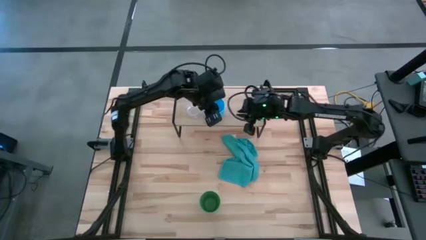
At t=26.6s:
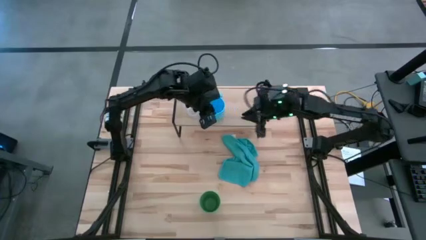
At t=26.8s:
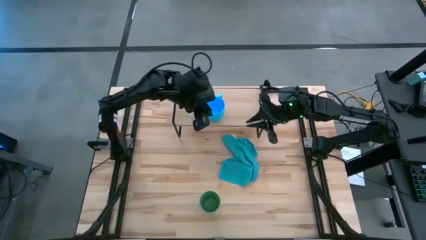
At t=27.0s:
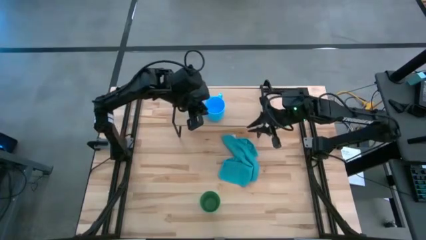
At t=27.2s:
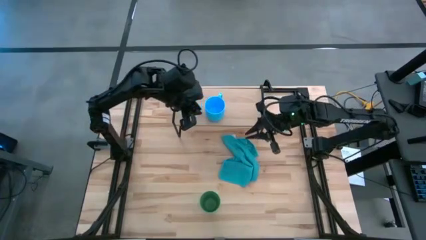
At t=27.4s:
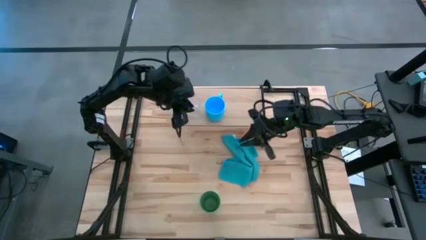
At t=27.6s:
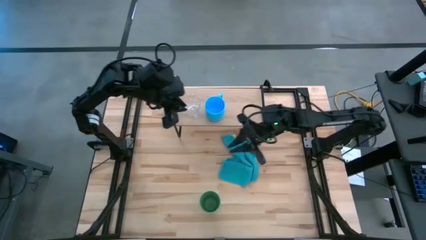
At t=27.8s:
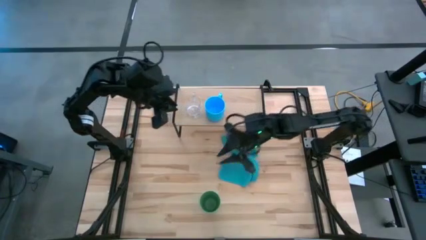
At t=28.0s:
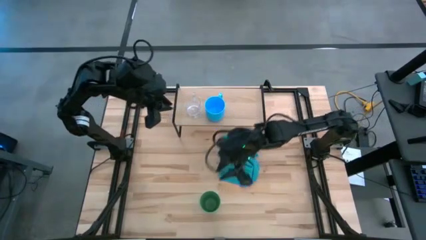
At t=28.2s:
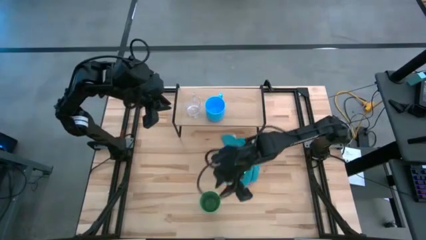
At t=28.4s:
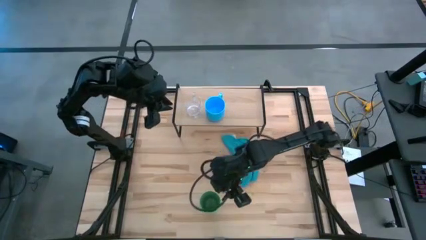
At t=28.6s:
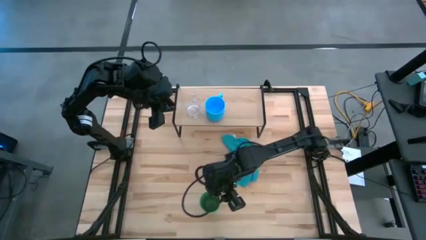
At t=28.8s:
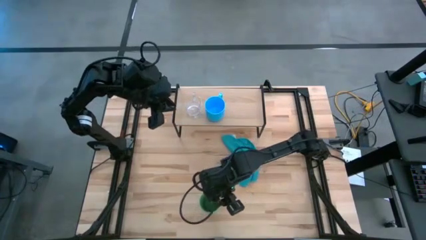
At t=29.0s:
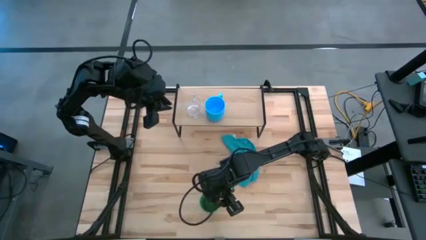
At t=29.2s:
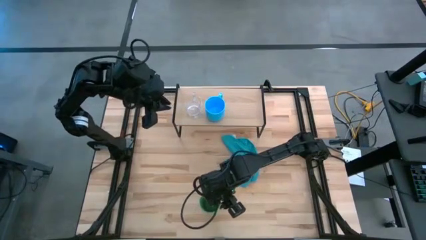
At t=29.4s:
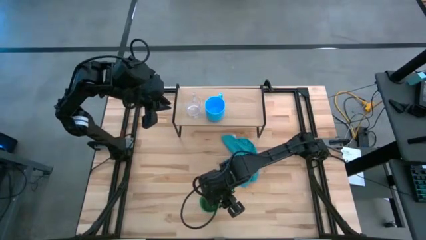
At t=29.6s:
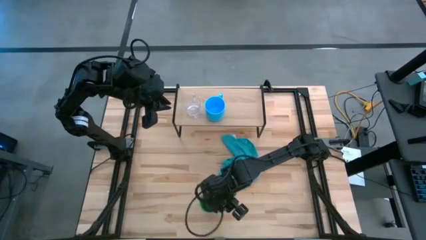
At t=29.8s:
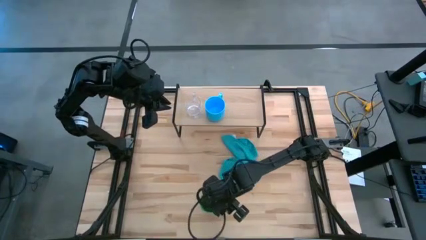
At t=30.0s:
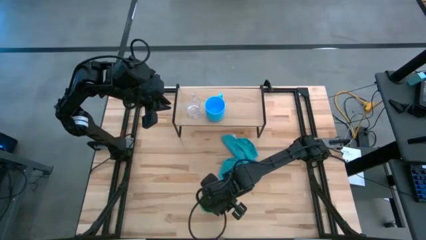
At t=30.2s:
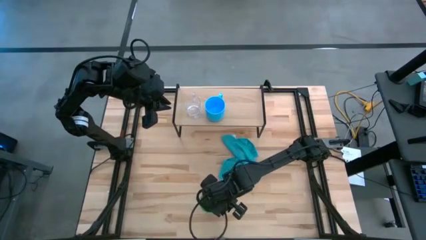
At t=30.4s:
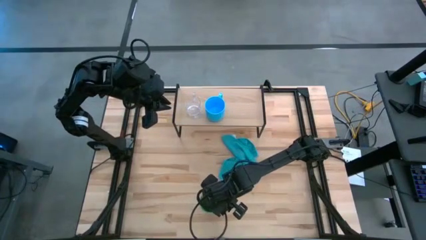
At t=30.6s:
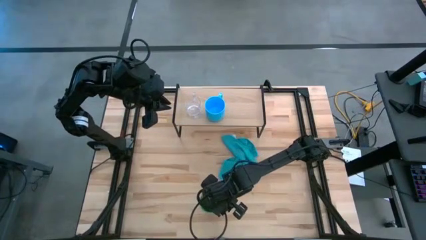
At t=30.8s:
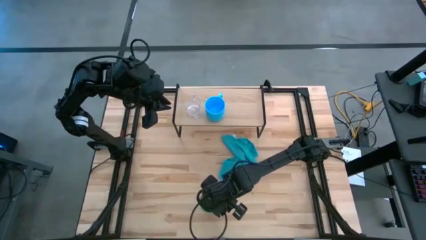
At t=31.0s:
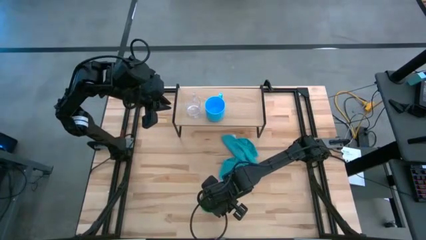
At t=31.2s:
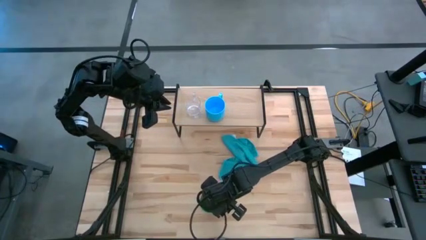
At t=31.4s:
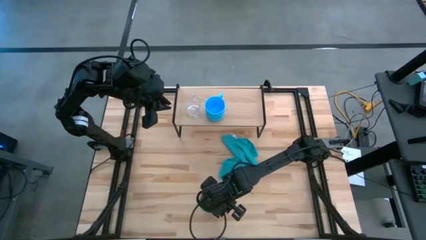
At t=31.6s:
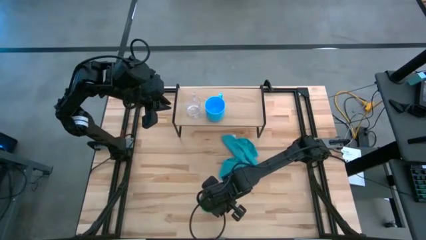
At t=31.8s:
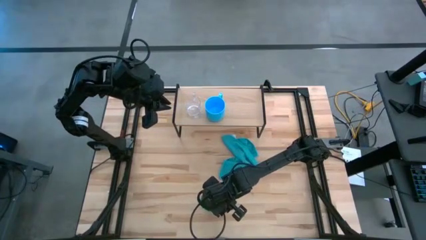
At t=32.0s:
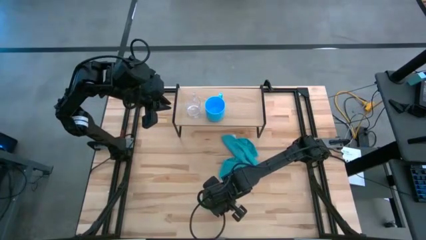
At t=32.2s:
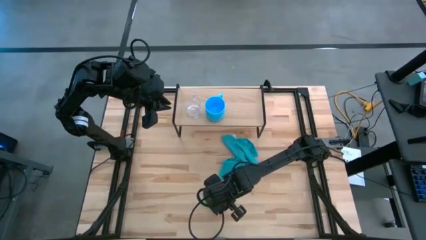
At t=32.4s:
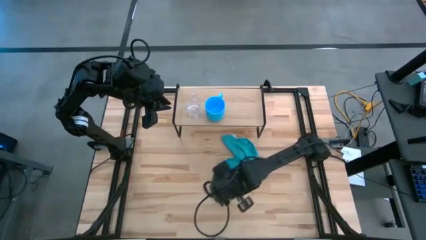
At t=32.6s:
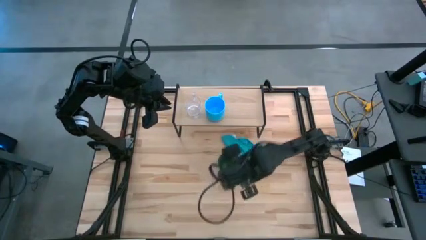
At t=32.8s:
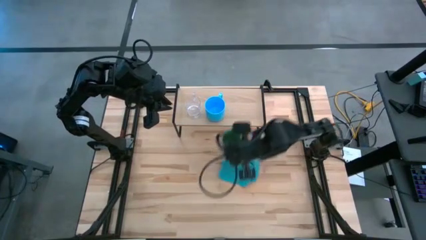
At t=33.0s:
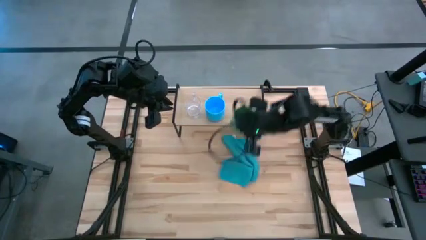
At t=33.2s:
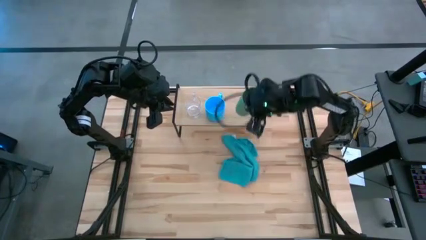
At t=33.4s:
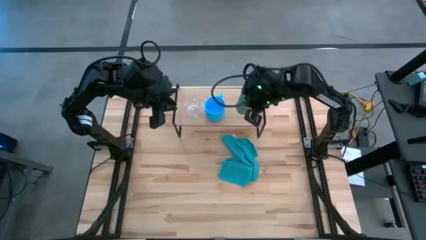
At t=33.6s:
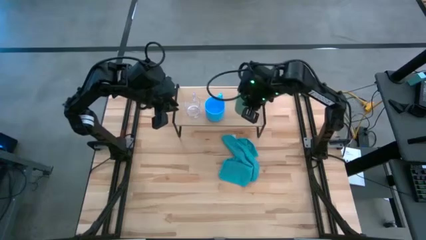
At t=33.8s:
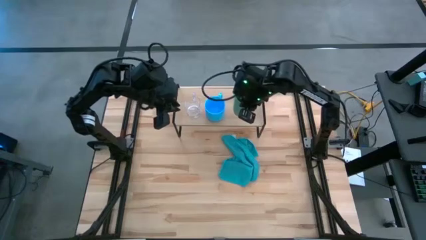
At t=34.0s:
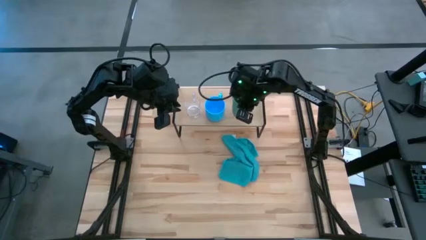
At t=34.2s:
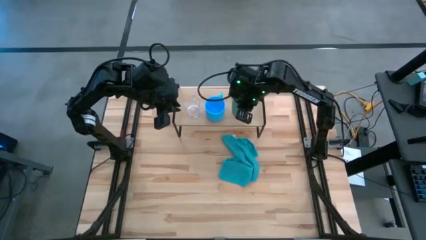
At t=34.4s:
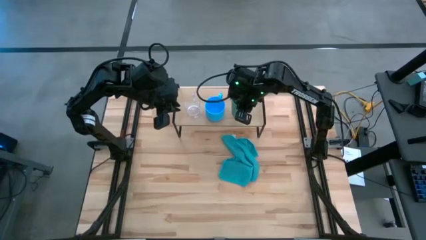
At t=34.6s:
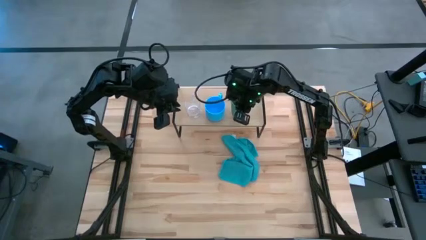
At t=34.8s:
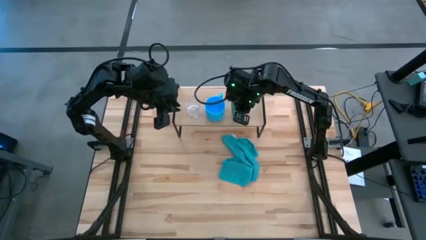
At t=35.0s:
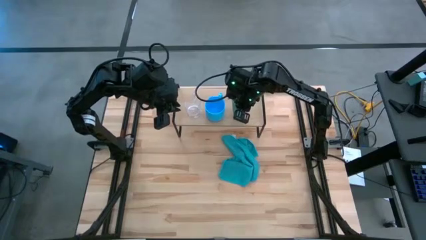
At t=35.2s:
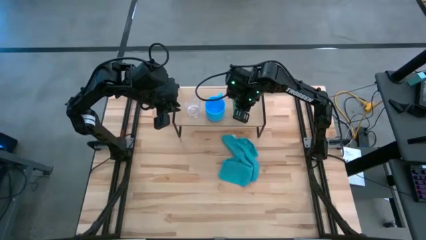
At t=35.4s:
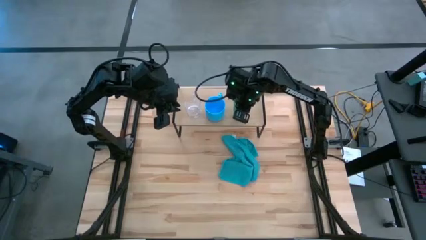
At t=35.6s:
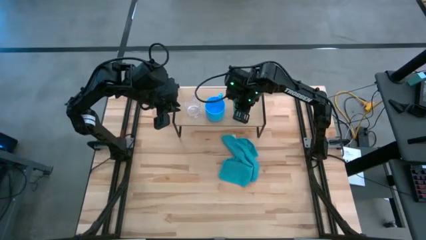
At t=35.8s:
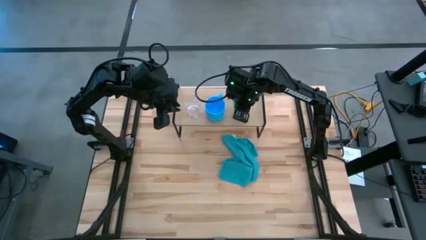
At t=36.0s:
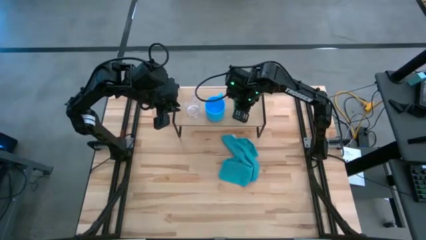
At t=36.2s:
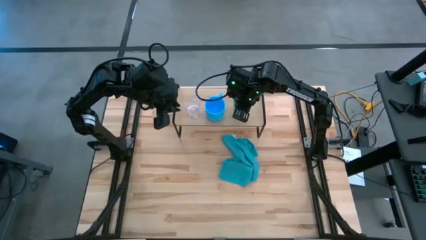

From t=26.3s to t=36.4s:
Task: Stack small to large cups/mugs on shelf
Put the green cup on the shelf
